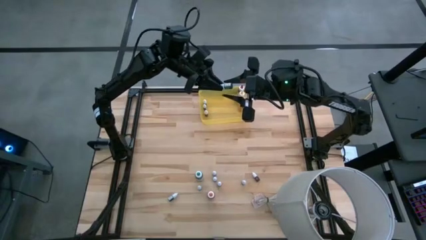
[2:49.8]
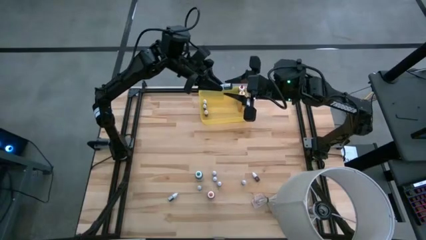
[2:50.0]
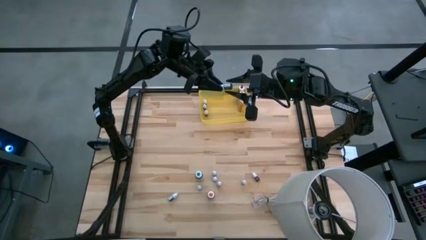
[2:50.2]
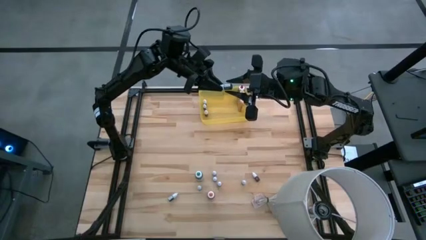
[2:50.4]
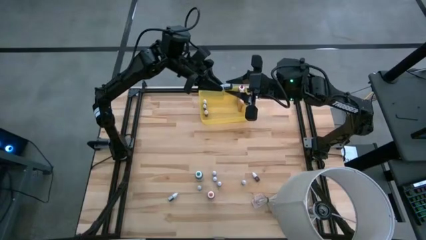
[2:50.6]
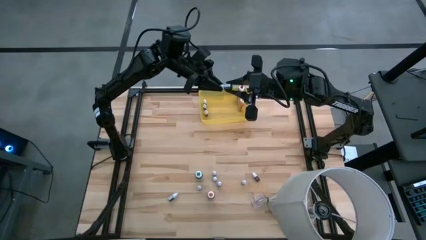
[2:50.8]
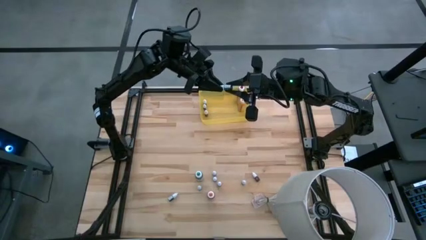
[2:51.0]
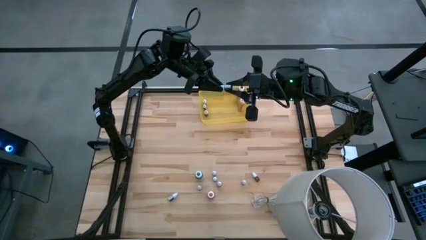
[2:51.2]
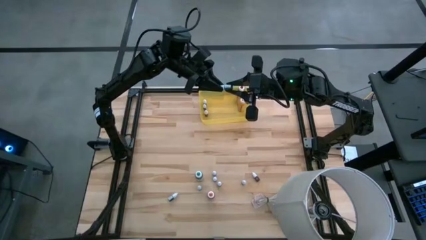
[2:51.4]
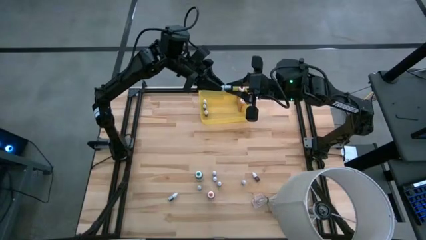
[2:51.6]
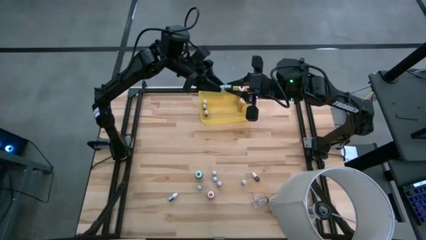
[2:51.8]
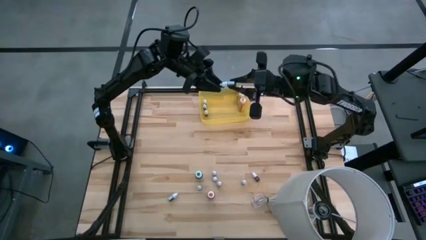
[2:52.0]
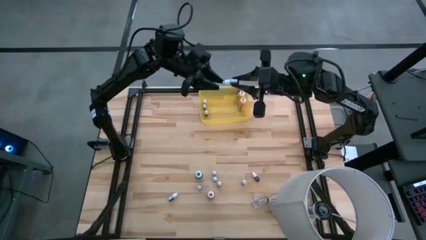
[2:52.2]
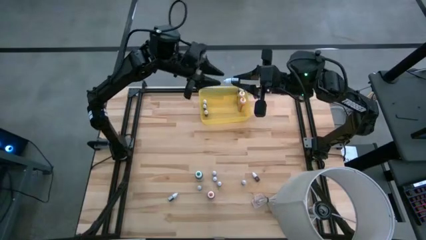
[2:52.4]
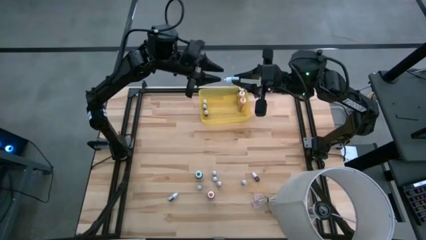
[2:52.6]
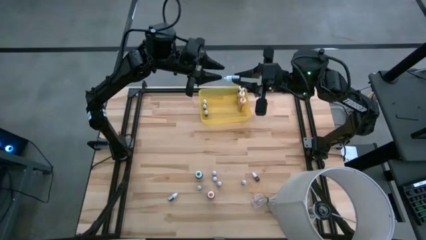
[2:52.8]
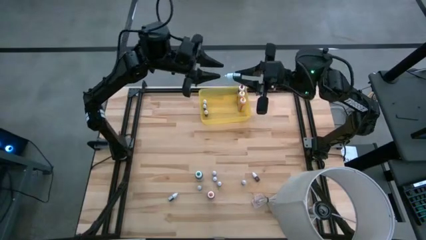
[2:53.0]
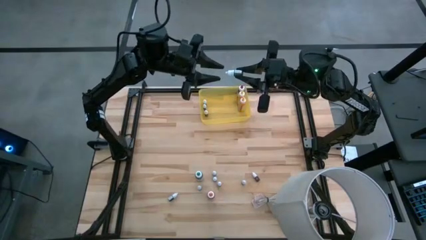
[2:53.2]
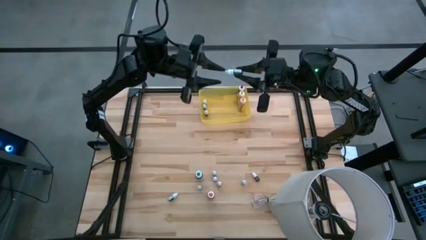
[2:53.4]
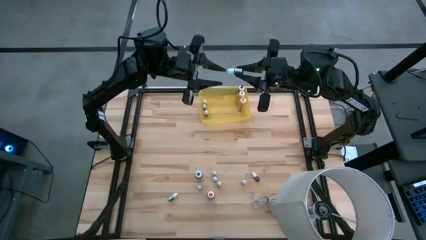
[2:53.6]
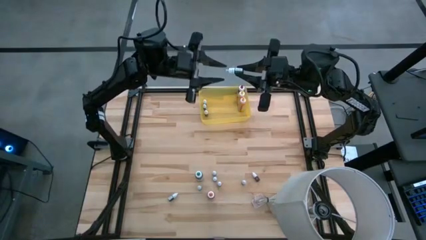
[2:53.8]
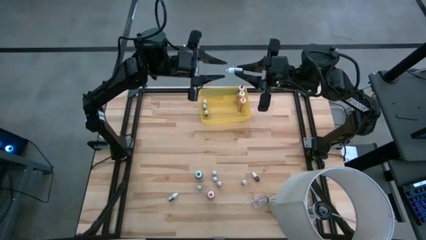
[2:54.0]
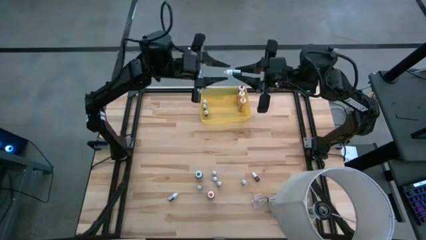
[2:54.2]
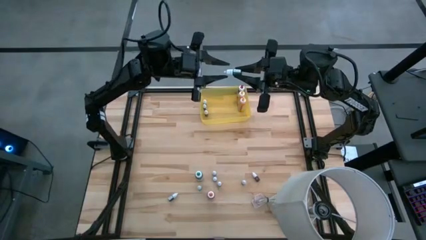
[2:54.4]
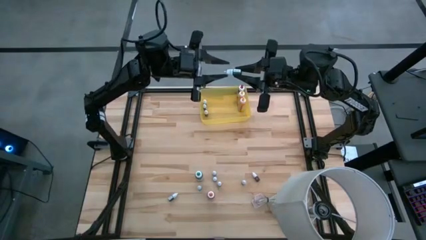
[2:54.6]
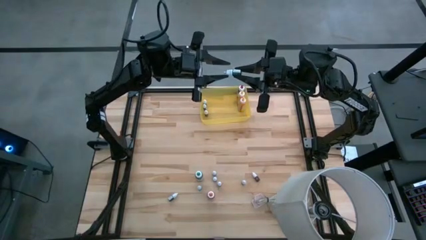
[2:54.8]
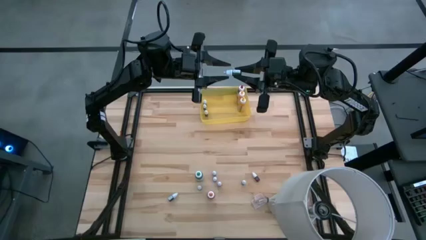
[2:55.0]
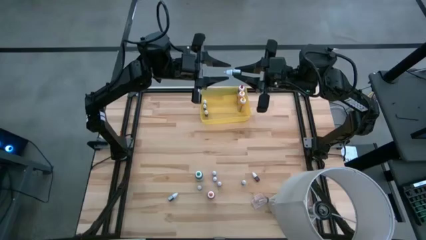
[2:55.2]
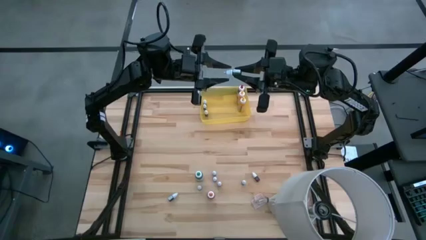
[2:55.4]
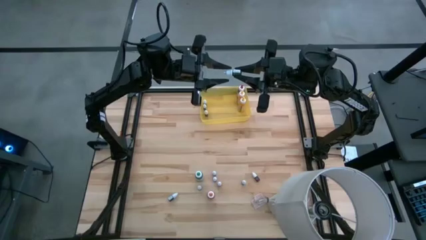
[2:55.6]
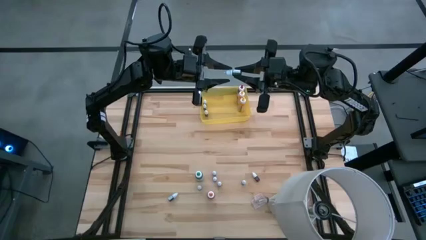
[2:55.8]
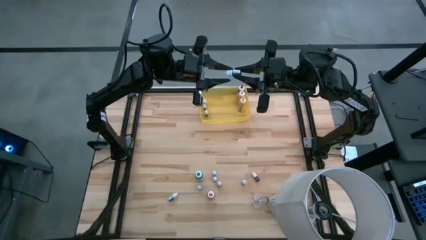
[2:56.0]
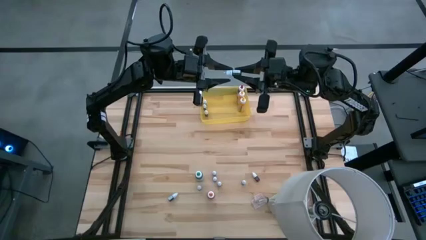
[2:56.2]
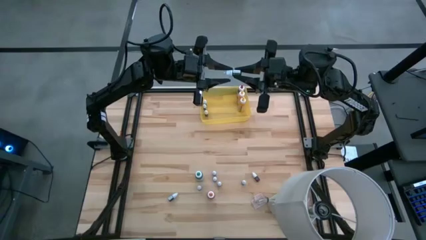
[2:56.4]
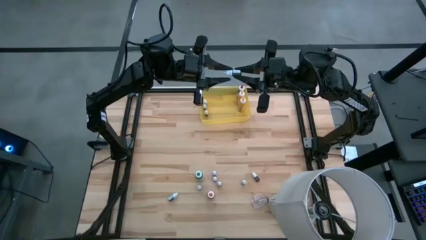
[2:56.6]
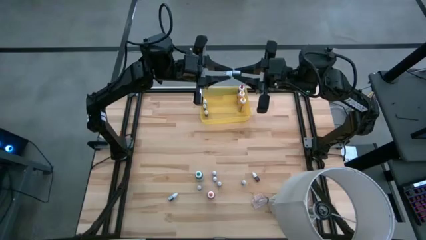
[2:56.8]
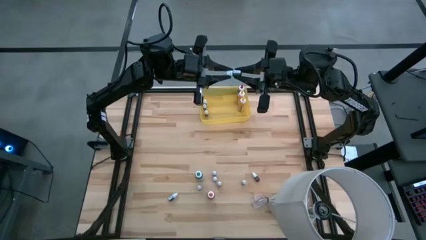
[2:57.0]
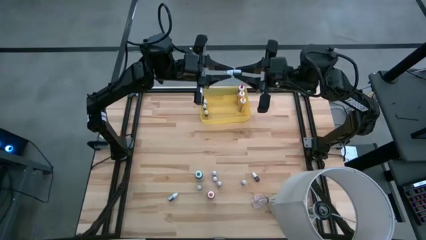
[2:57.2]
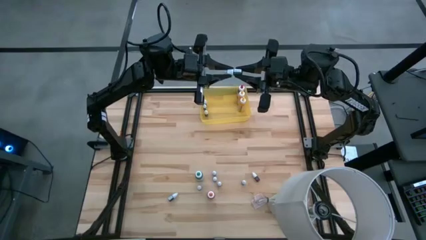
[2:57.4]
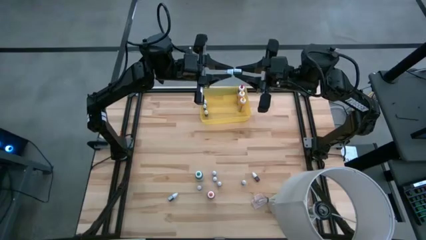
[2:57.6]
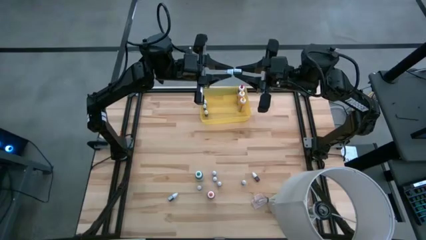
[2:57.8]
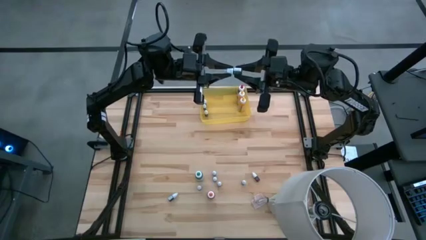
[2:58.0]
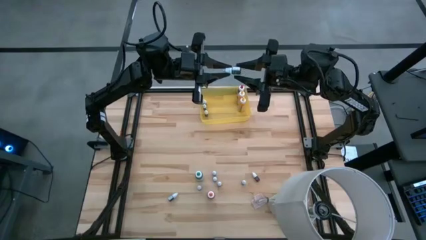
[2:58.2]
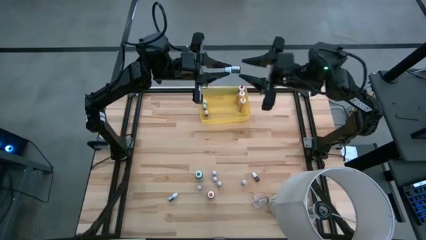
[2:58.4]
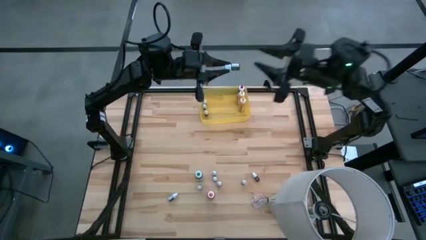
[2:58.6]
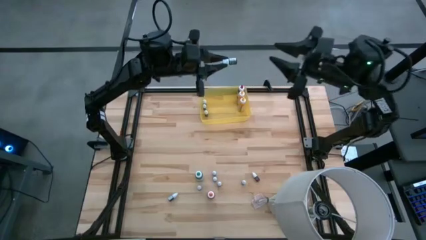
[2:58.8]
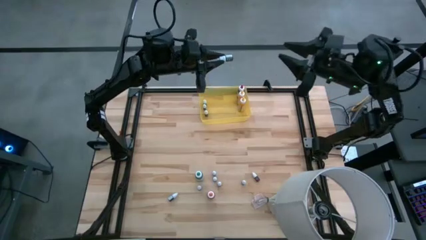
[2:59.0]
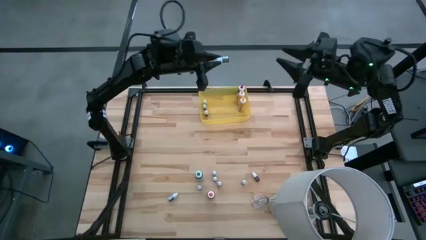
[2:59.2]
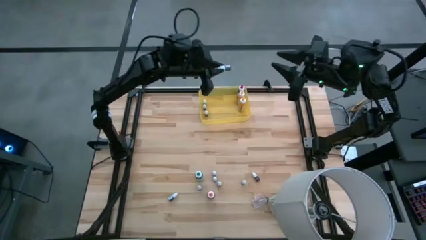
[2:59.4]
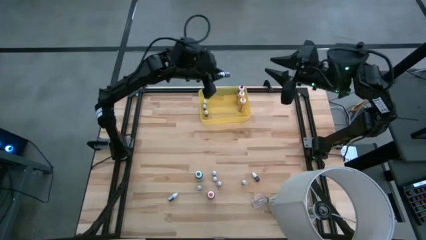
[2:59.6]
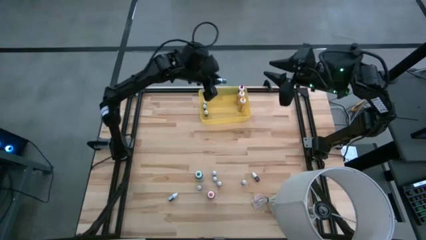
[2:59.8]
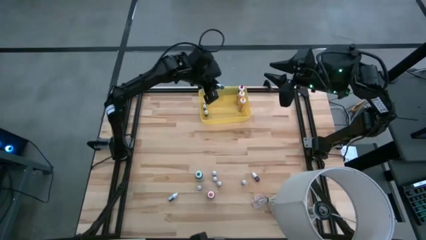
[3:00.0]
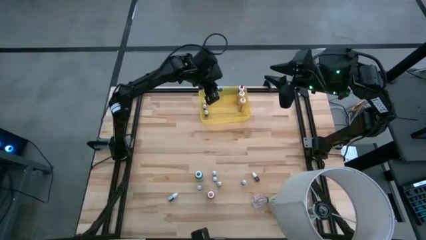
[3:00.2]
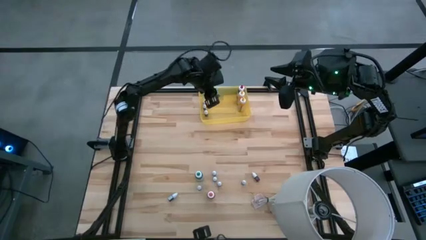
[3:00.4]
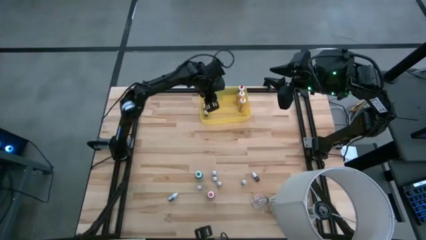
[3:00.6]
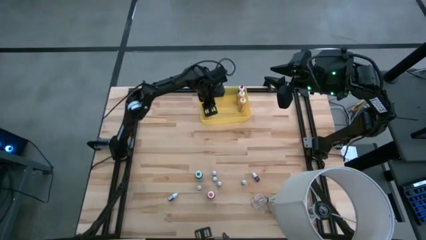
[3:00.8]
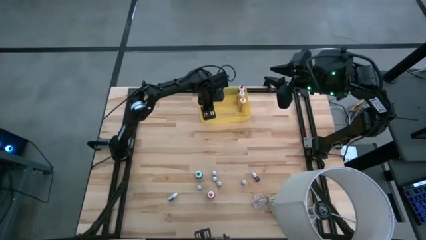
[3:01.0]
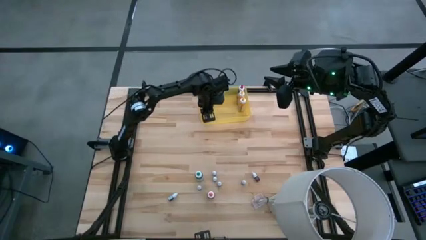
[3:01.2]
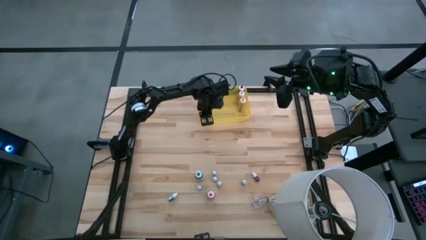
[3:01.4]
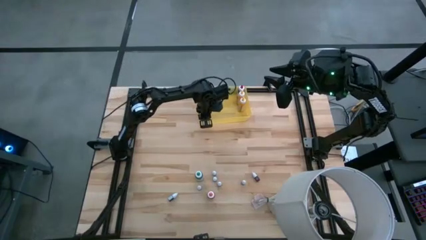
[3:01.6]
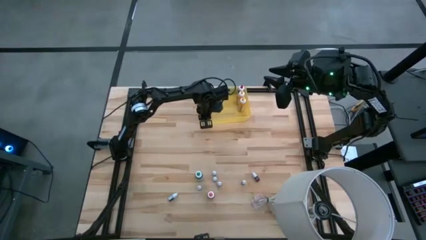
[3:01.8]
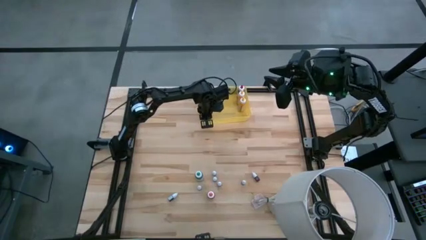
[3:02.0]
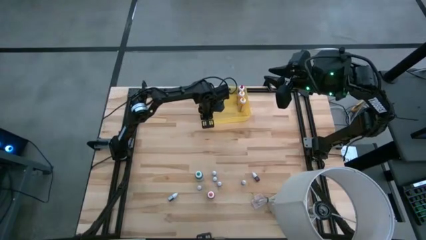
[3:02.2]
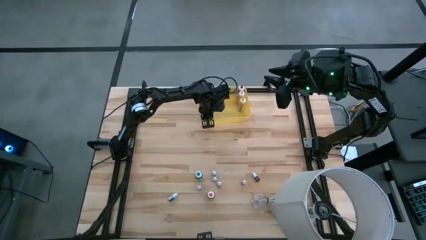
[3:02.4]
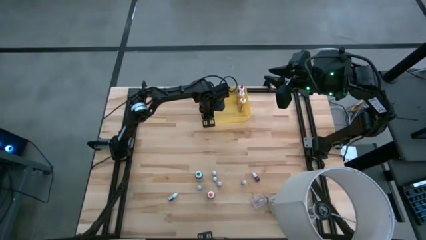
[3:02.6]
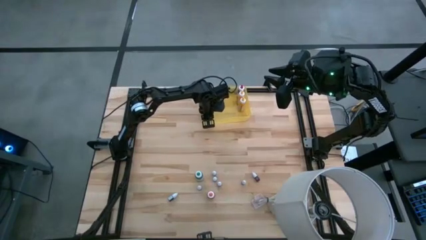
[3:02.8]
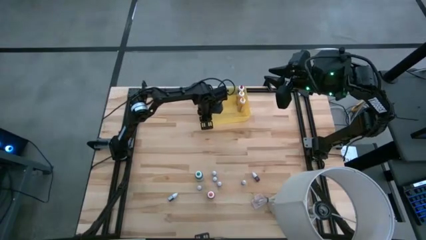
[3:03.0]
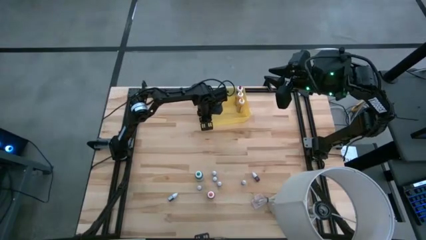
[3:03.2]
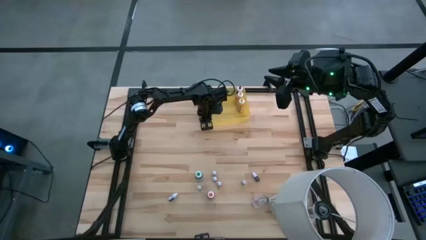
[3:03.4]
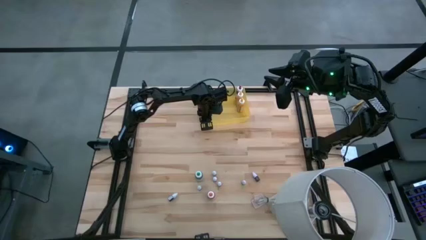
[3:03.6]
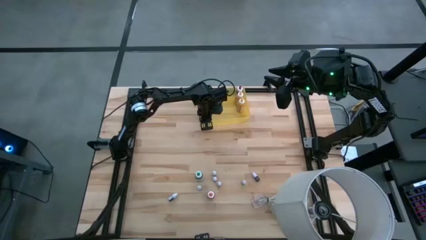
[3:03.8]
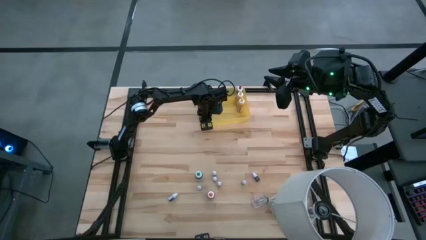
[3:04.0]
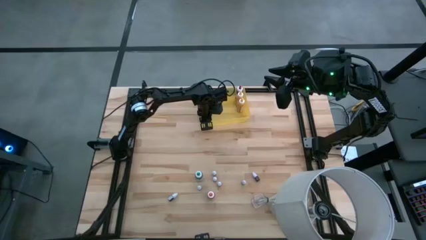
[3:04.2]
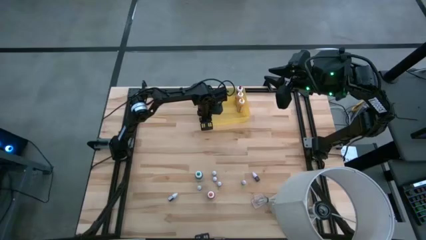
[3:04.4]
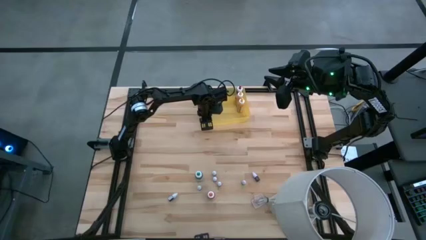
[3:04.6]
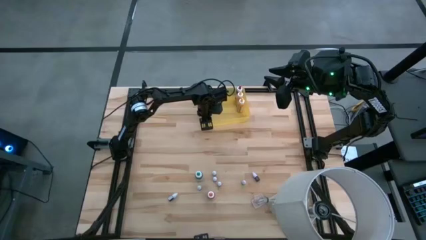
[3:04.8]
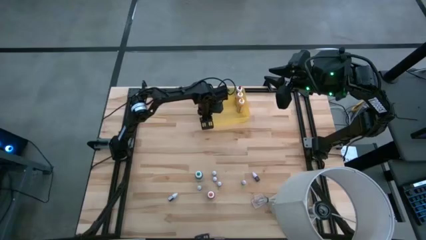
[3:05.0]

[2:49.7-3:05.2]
Task: Pick & Place food coloring
Put the left small green food coloring bottle into the yellow bin
